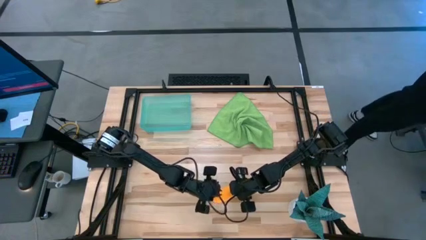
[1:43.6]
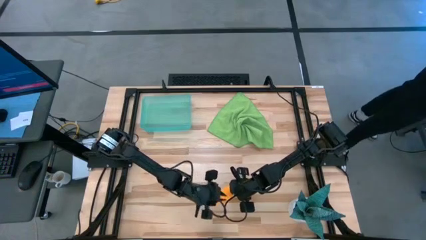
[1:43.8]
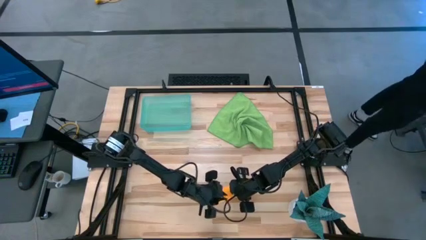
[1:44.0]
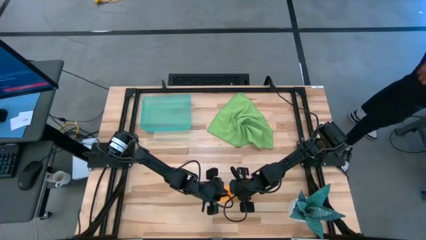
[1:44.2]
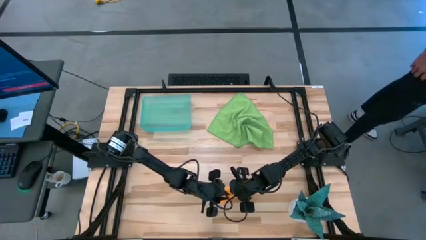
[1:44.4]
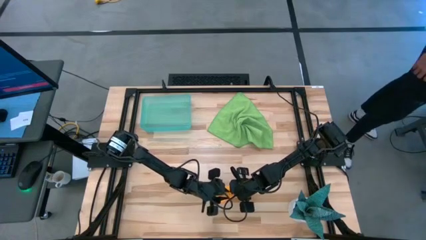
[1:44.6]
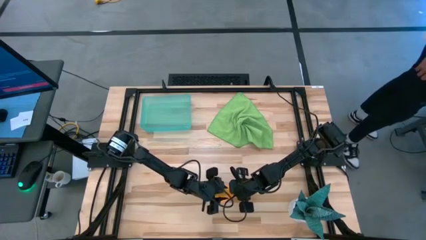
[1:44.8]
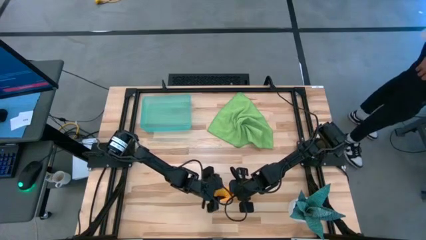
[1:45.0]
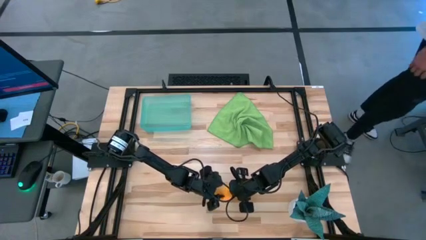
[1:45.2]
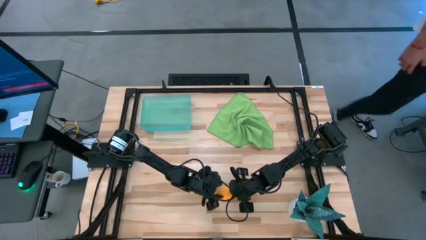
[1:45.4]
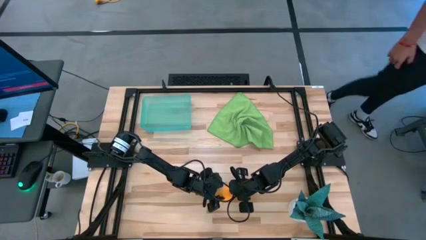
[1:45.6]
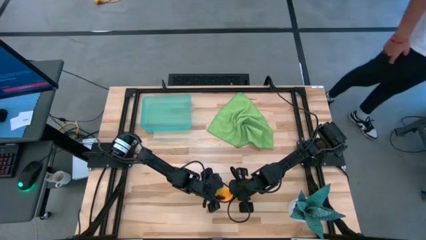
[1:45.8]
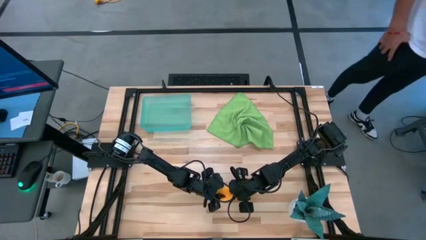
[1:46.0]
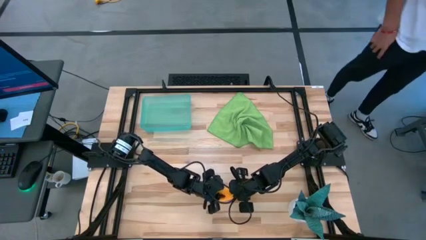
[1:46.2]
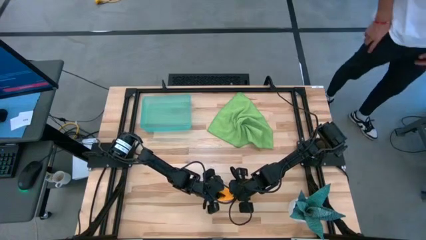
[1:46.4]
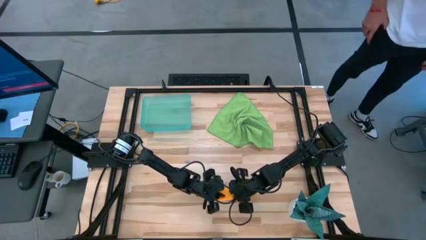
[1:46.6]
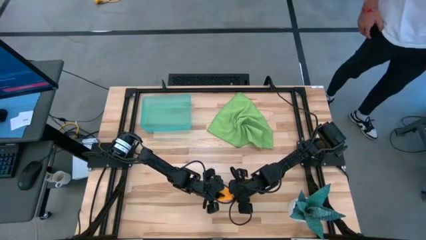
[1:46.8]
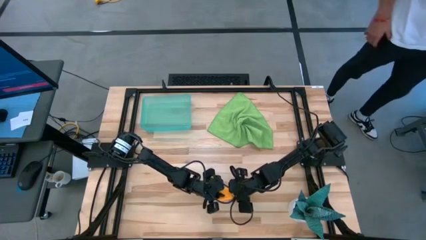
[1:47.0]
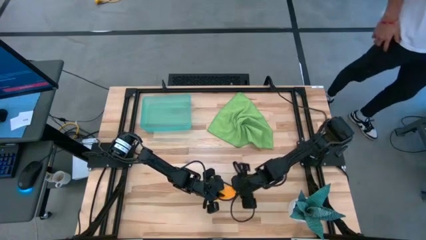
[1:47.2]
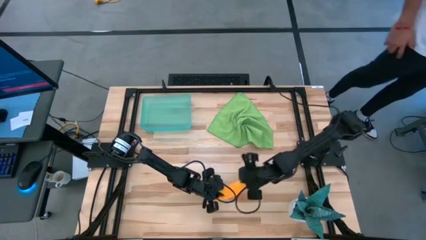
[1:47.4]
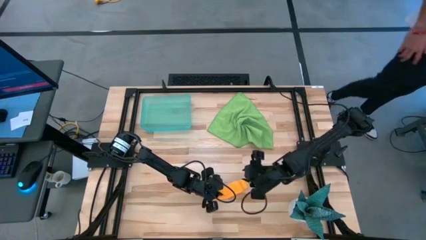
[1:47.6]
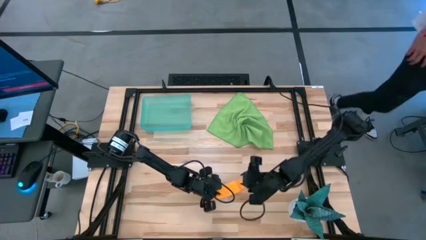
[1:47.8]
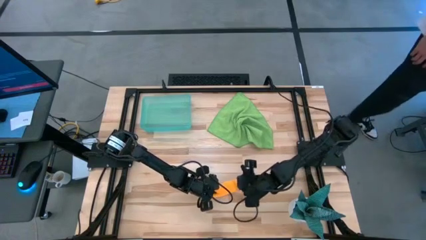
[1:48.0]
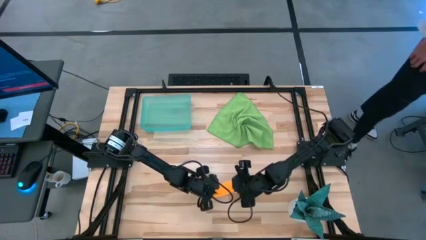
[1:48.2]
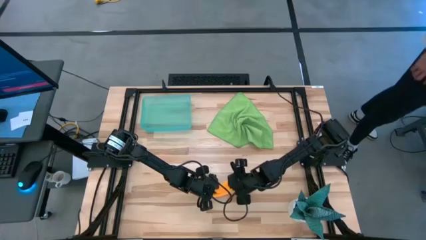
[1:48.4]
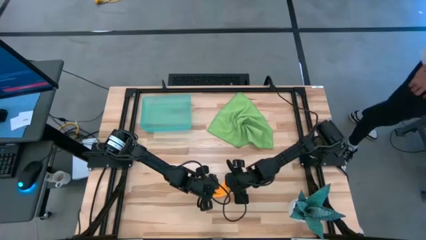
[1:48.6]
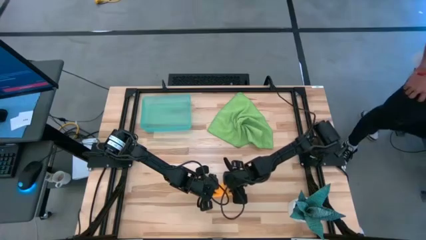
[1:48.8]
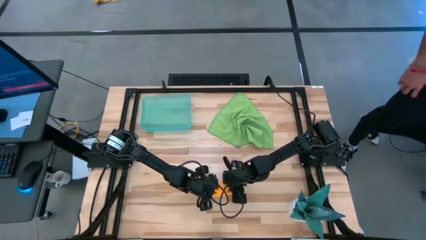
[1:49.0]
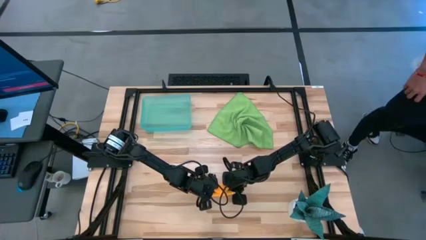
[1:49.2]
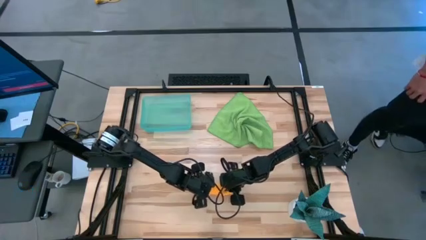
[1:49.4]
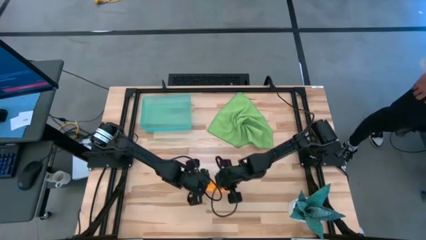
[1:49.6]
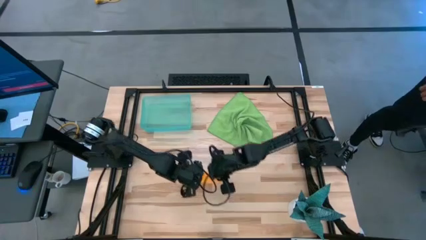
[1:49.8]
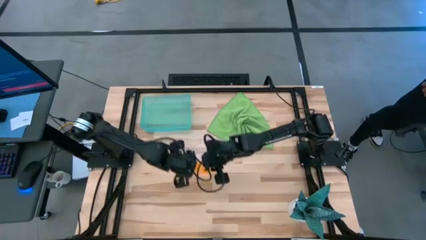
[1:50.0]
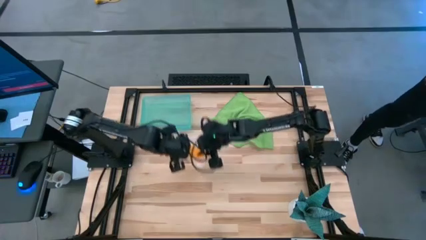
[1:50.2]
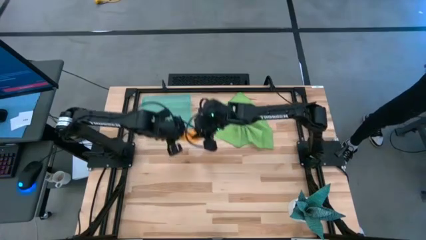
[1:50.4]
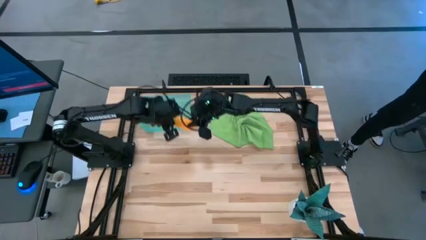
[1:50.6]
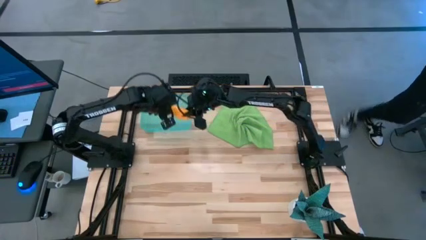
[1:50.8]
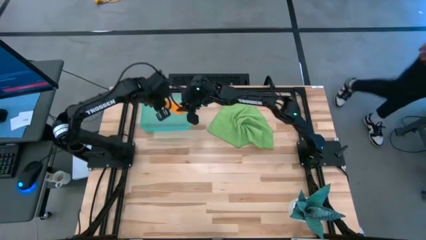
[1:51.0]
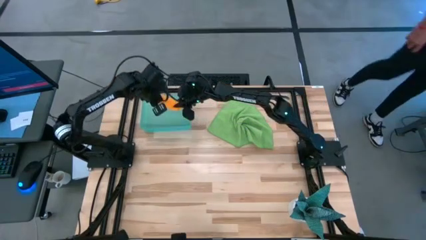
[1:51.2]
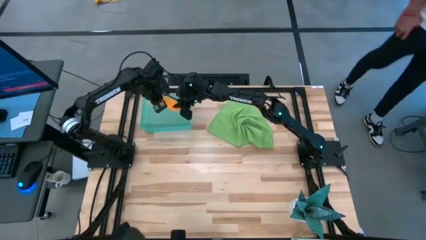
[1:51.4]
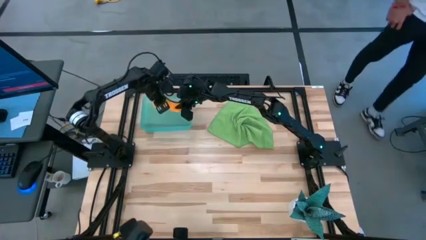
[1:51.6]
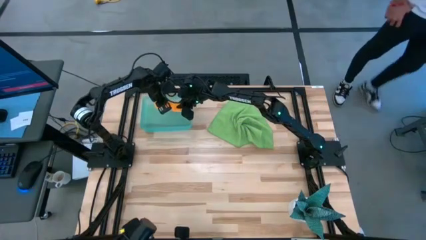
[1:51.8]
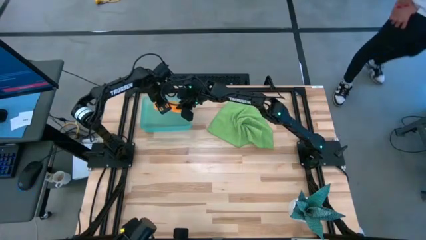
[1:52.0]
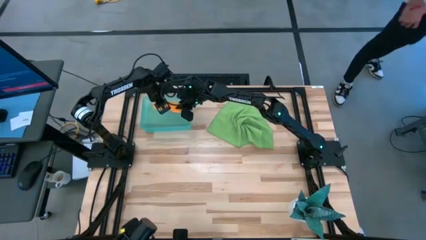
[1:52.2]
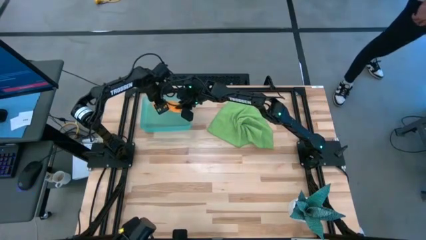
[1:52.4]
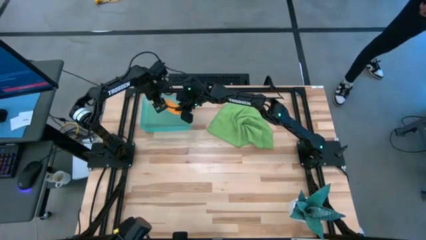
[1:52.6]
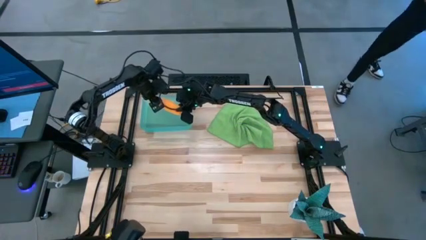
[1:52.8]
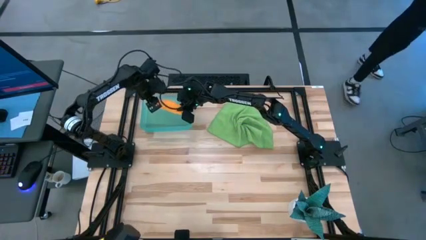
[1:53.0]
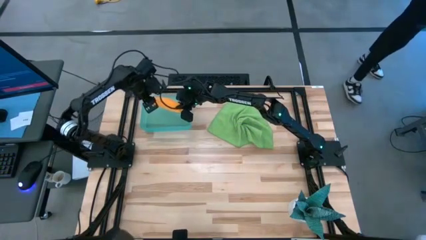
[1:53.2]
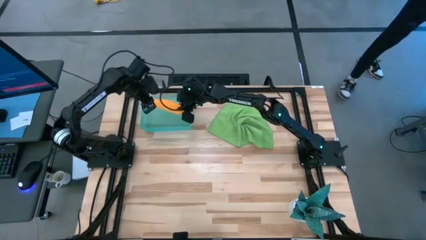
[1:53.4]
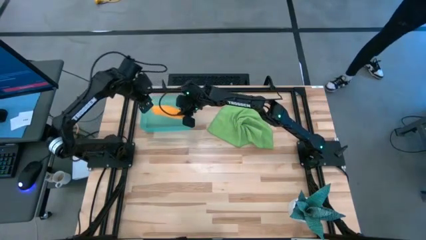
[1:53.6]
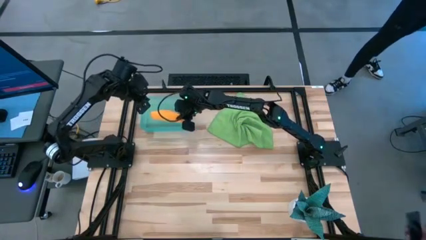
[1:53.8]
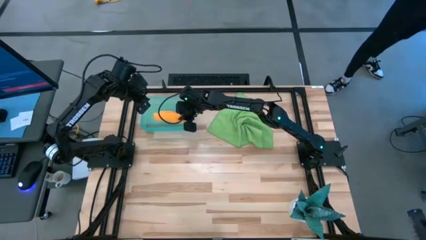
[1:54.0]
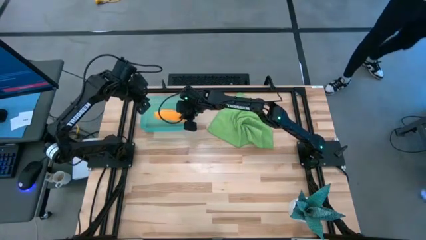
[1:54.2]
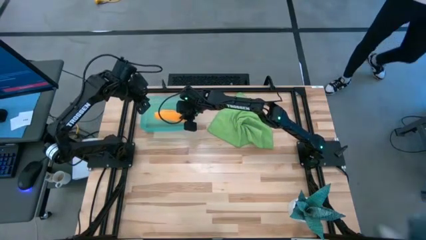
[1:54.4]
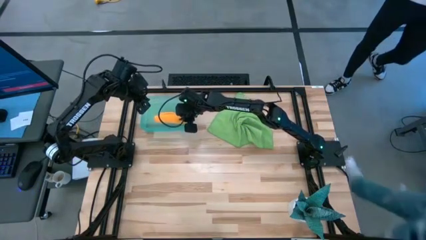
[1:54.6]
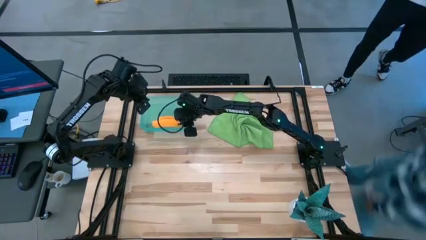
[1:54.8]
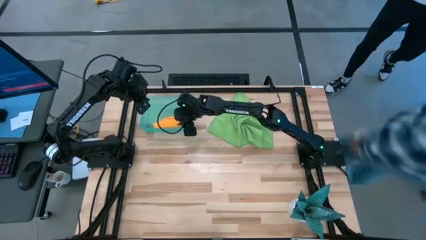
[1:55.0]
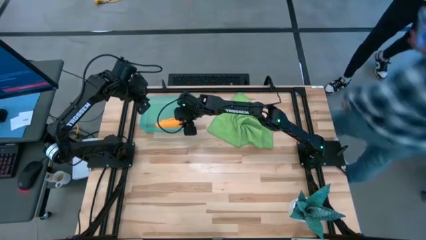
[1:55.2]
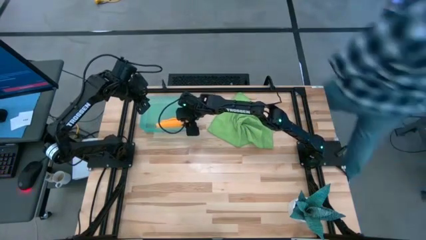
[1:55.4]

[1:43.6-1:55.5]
Task: Roll microfiber towels into tight, uniform cylinder then place into a basket
Put the yellow towel into the blue bin

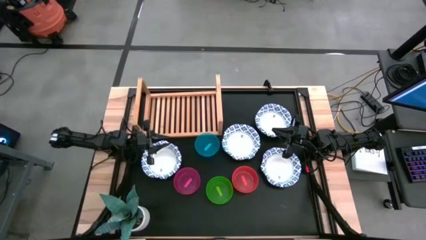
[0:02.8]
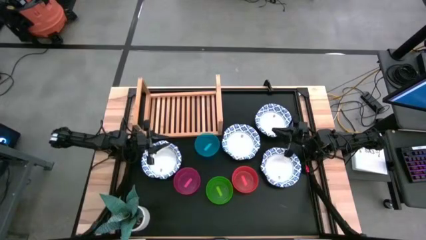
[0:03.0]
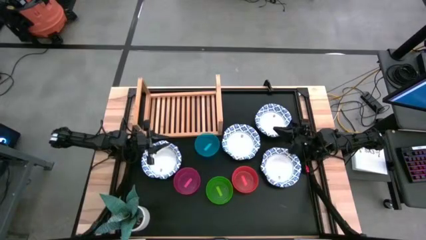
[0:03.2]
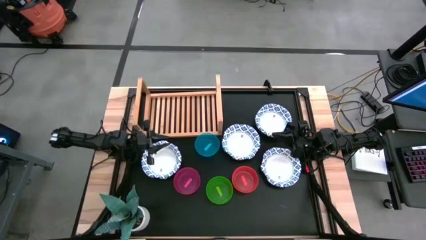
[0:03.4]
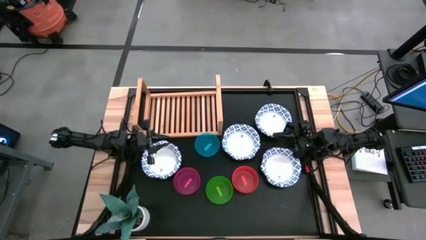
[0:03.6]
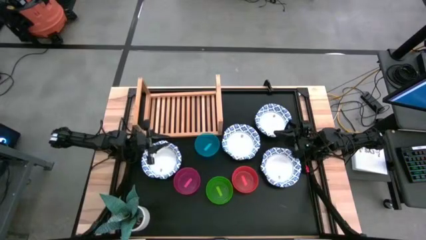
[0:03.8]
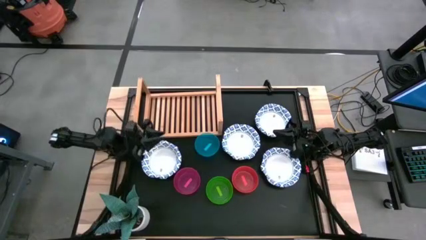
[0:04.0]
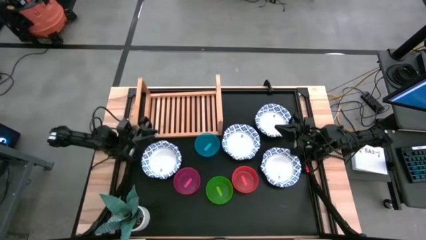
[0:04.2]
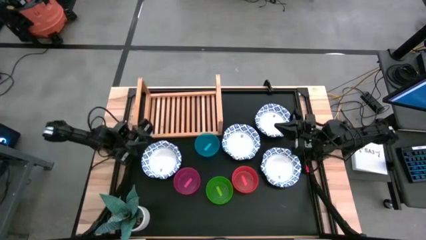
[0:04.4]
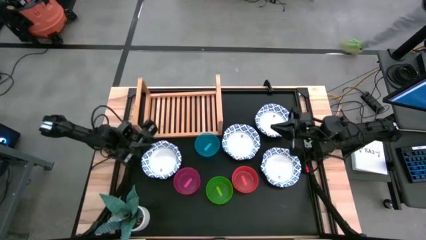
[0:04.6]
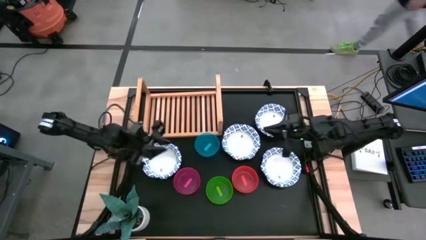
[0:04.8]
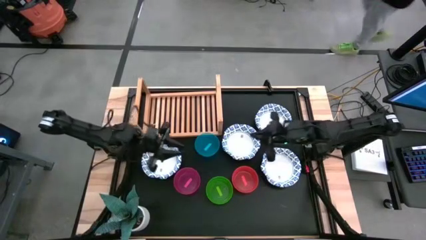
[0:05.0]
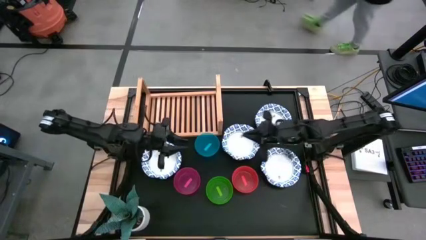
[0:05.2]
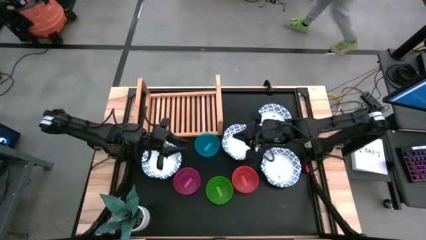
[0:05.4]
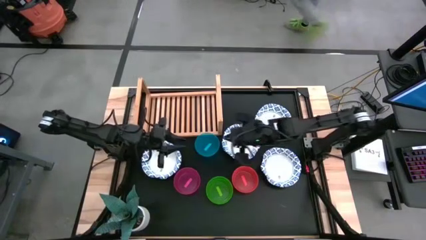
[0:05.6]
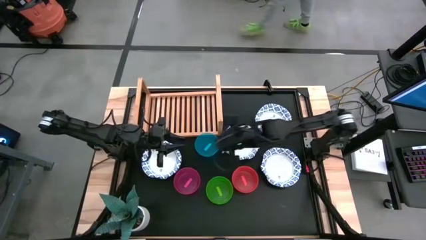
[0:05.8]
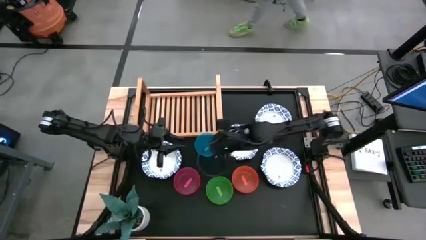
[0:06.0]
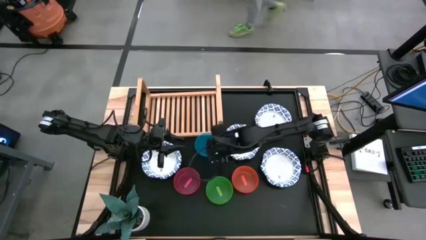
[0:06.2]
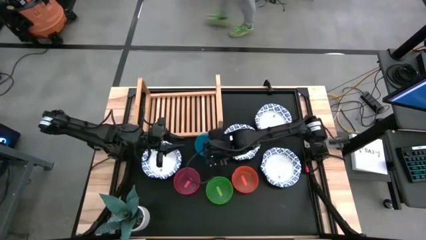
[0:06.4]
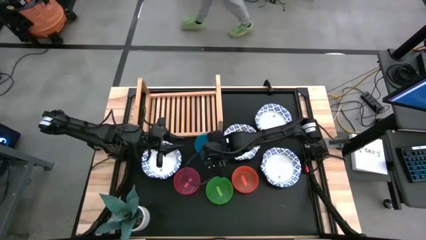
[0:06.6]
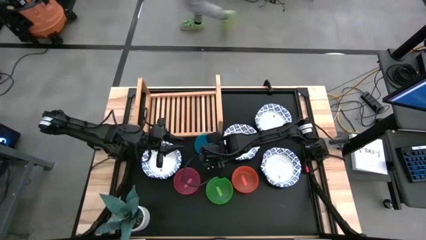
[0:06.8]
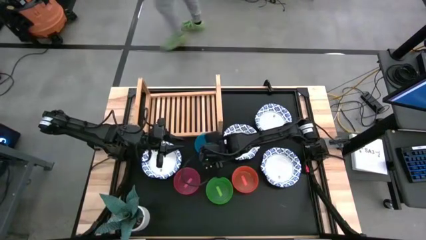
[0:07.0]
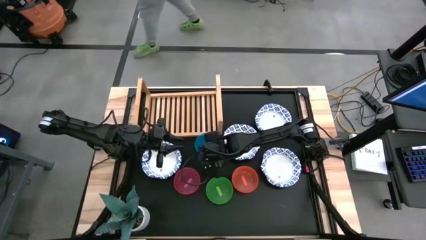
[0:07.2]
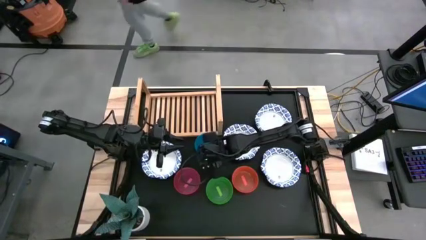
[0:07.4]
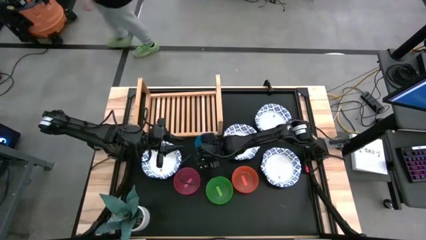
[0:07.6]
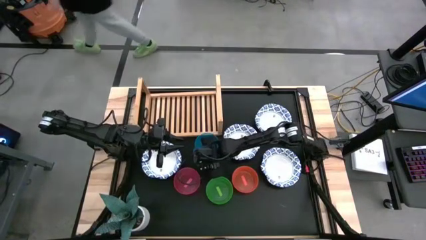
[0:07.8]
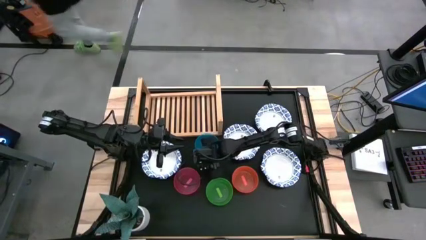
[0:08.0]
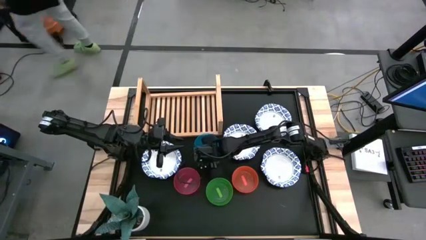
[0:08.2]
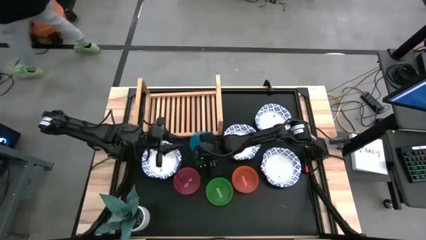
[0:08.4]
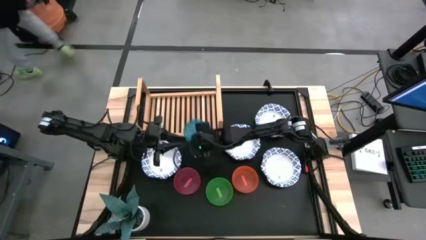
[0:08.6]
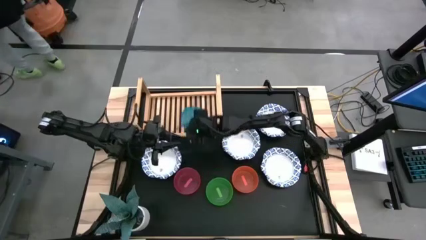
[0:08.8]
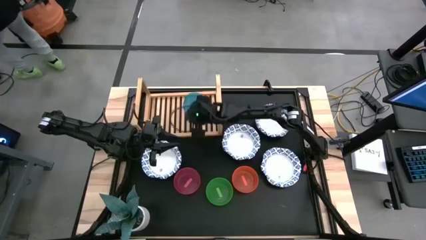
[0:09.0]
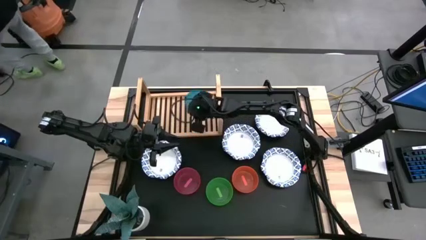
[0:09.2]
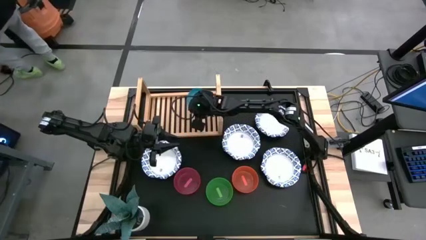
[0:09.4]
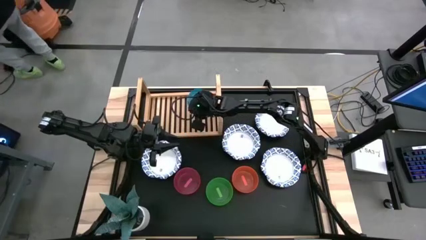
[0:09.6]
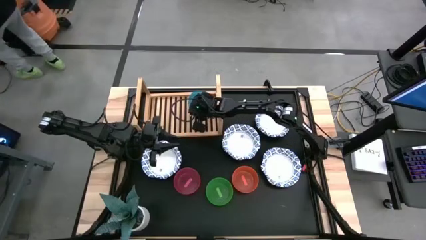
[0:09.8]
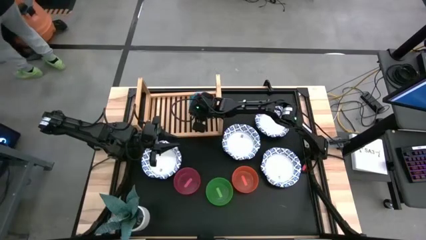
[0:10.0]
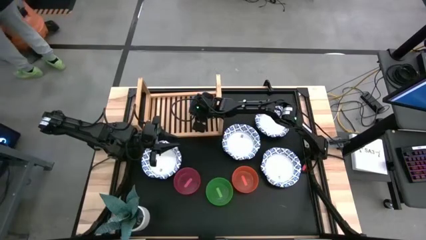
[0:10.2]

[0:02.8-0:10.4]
Task: Place and stack bowls onto a shelf
Put the blue bowl on the shelf
